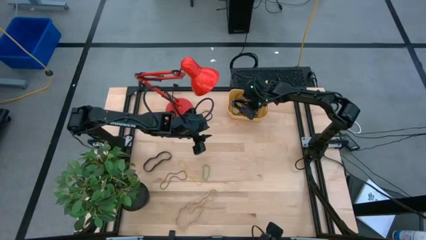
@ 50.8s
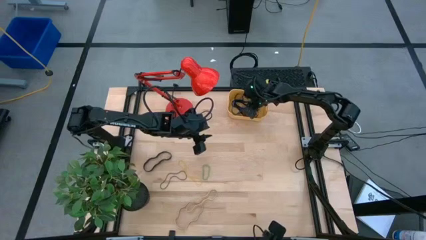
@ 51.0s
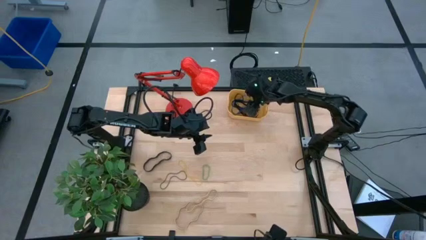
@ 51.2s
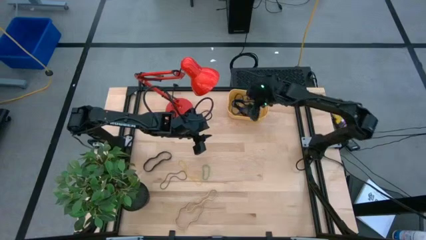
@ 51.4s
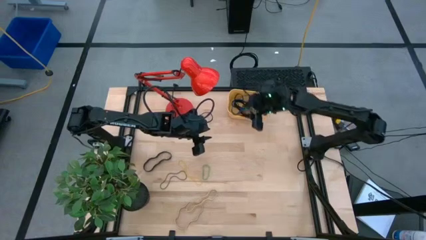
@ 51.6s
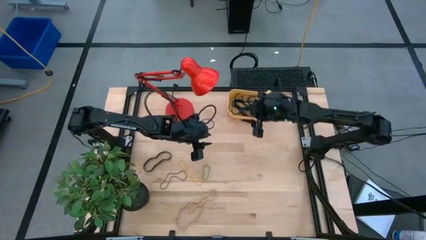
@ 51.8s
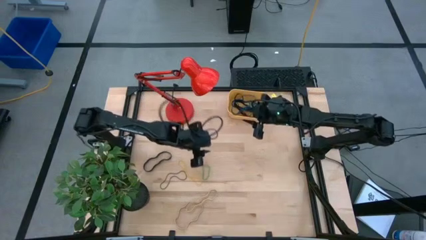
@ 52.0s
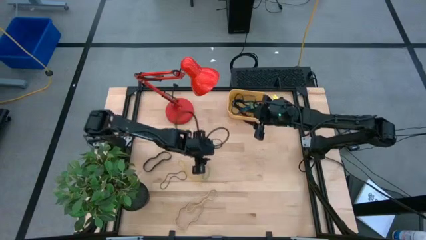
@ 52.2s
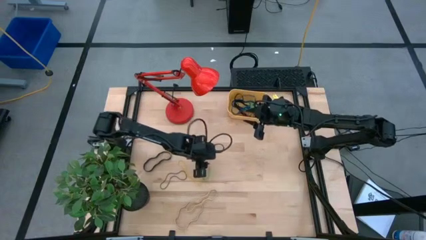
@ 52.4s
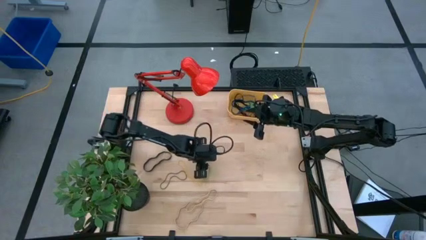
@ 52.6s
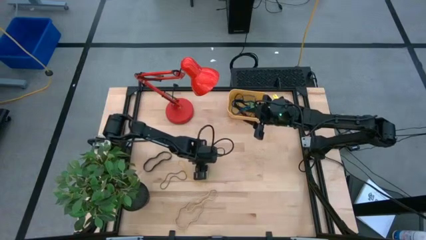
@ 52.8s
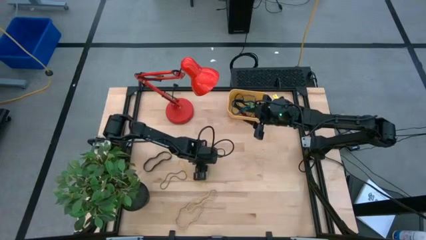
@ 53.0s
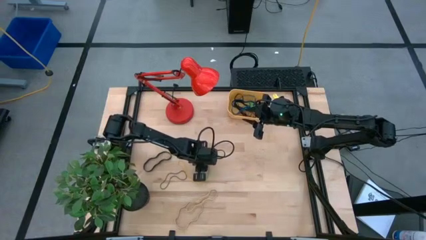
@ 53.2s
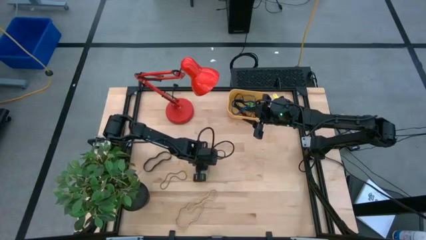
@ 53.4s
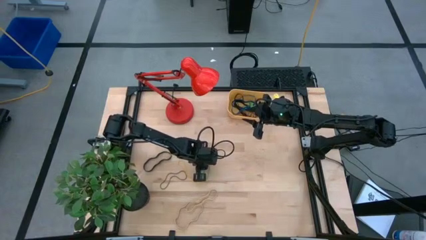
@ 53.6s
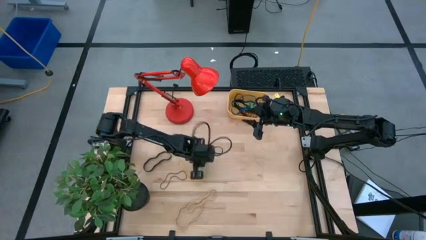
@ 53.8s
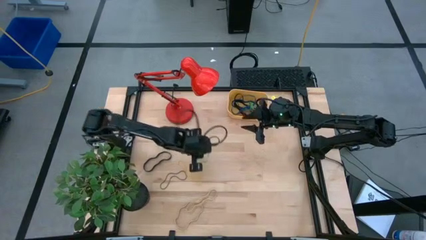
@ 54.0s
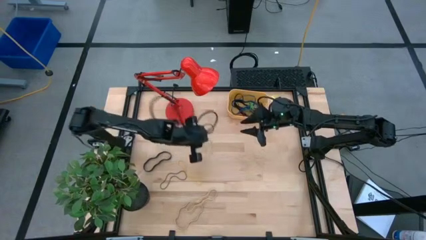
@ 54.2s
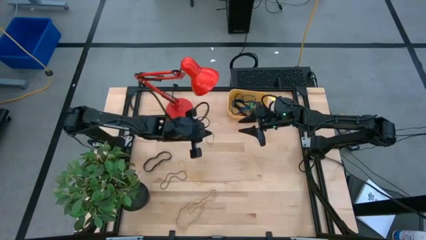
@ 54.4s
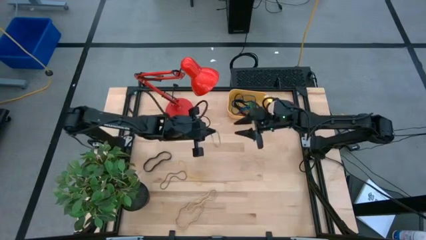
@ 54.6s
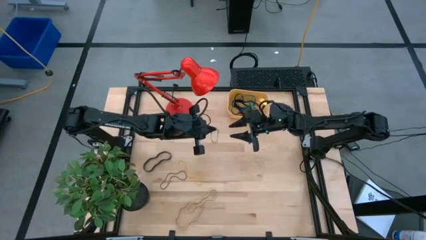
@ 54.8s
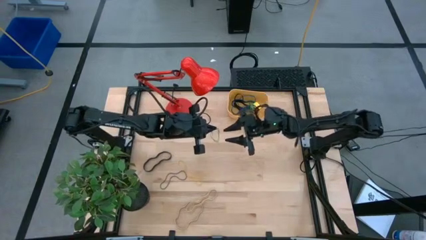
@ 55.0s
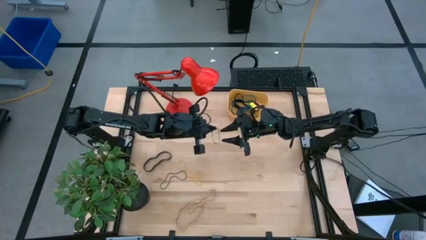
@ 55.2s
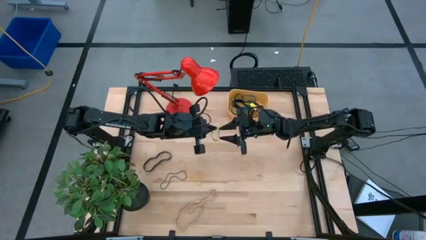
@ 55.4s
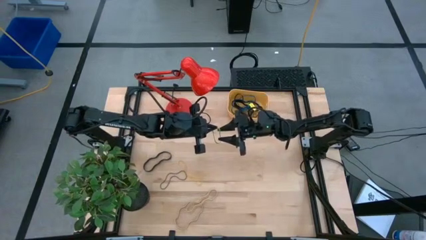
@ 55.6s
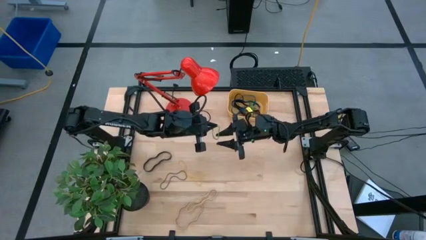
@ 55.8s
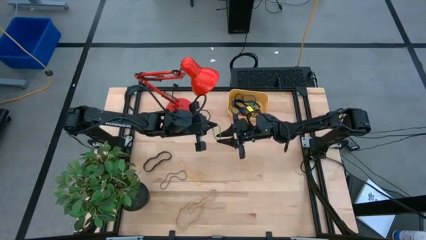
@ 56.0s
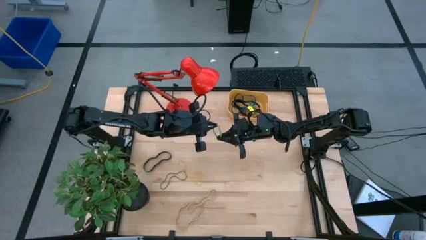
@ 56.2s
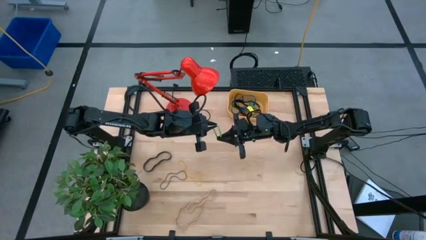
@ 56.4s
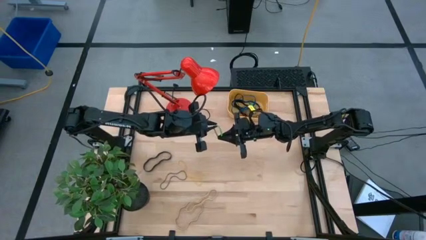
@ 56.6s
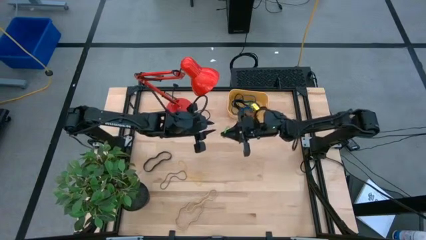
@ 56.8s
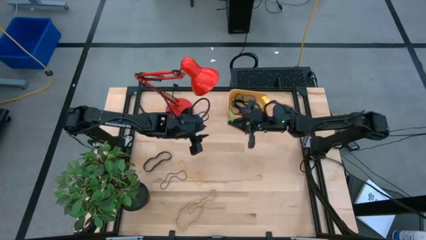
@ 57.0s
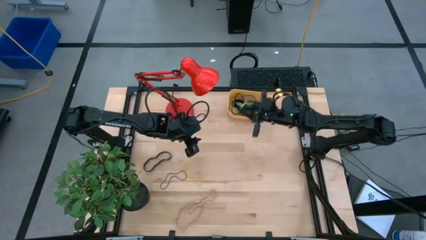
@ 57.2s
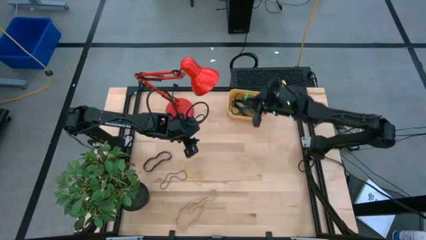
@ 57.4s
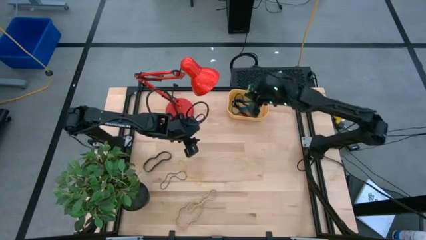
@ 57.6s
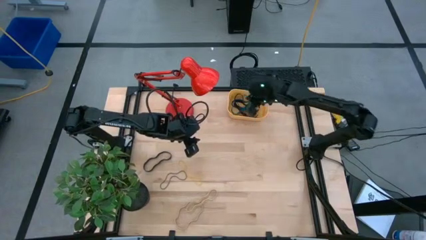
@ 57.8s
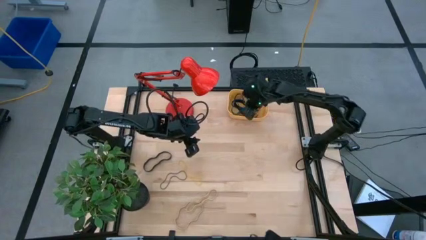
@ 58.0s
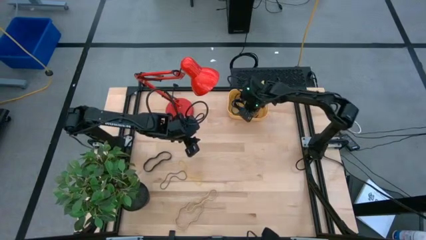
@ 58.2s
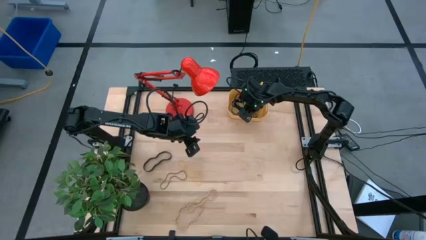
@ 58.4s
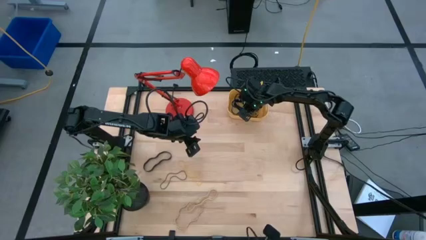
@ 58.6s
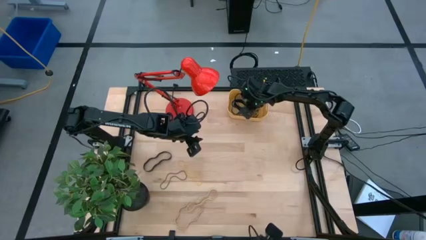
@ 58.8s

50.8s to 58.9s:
Task: Pick and place rubber bands into bin
Put the green rubber band into the yellow container

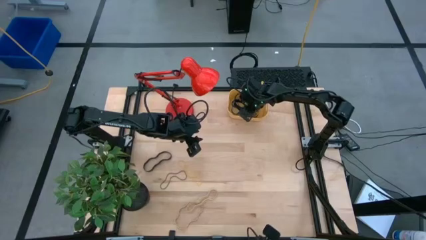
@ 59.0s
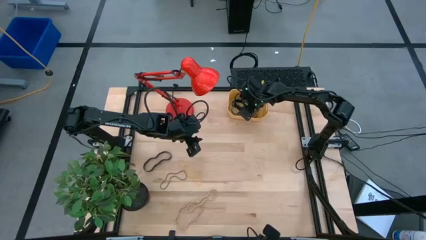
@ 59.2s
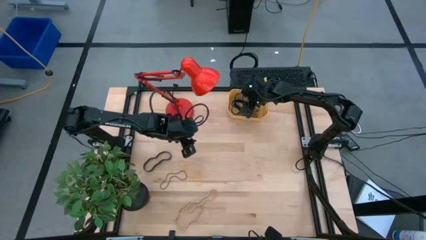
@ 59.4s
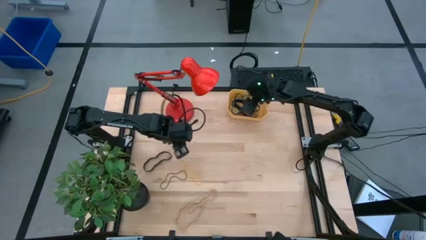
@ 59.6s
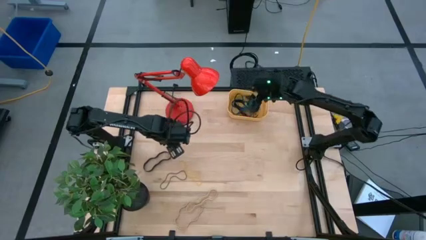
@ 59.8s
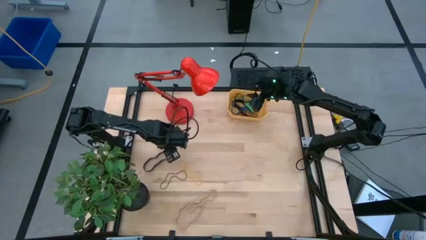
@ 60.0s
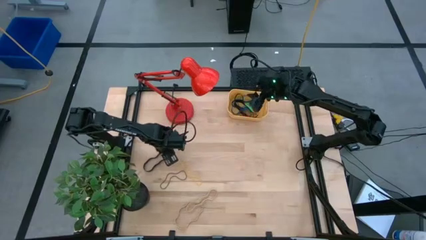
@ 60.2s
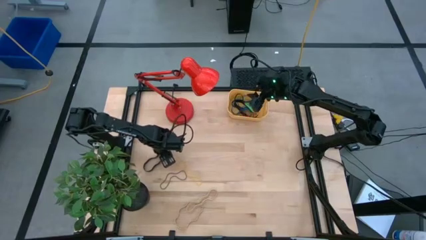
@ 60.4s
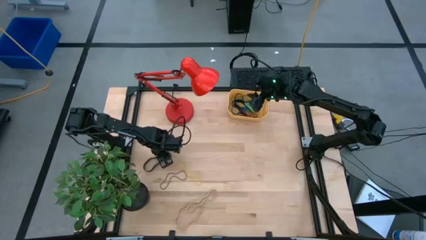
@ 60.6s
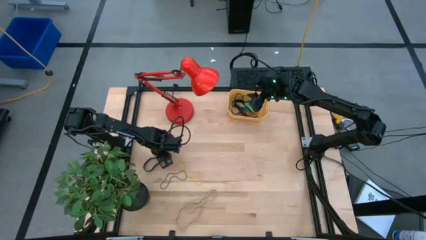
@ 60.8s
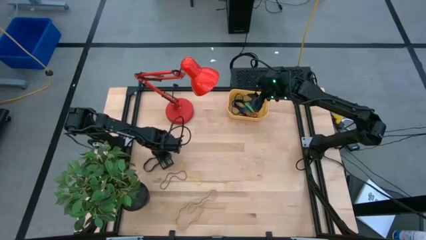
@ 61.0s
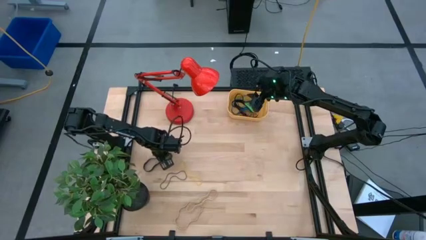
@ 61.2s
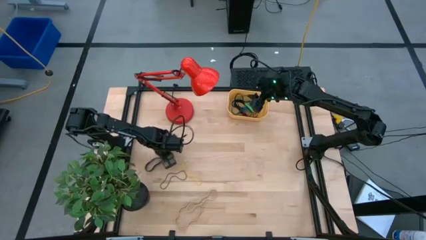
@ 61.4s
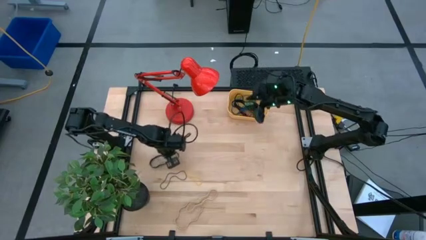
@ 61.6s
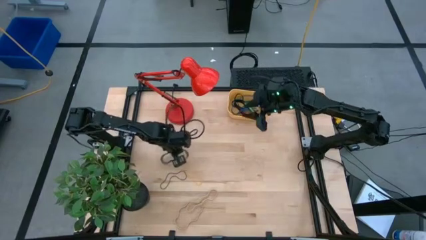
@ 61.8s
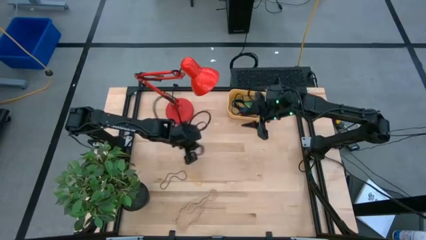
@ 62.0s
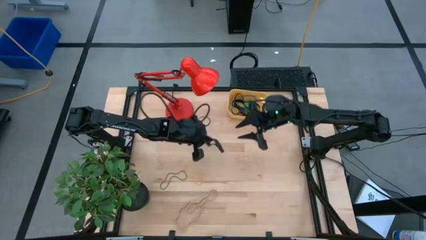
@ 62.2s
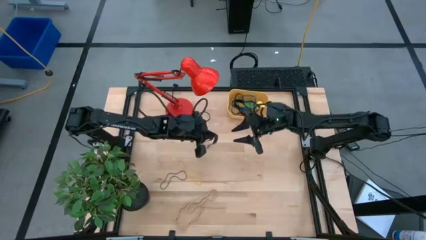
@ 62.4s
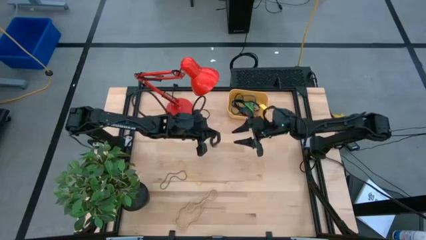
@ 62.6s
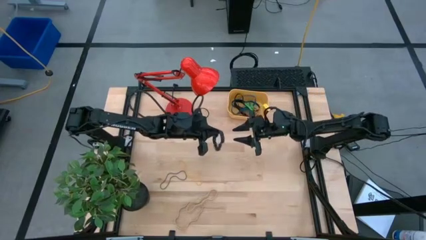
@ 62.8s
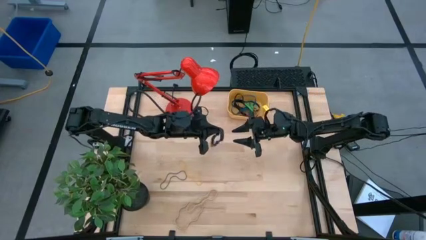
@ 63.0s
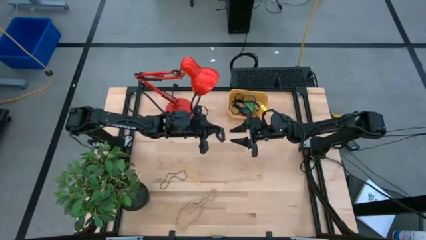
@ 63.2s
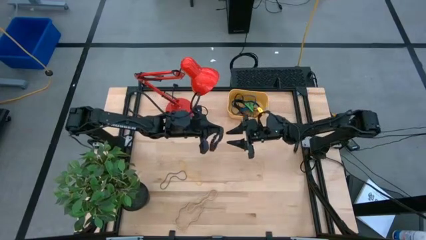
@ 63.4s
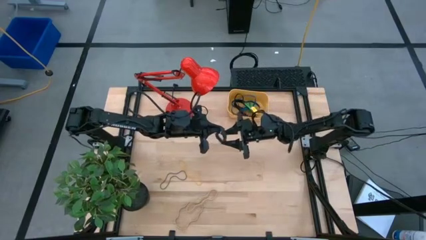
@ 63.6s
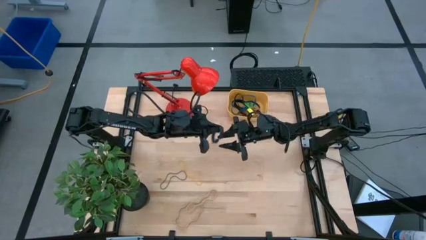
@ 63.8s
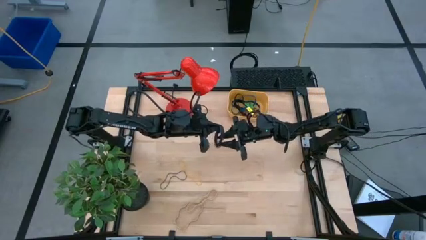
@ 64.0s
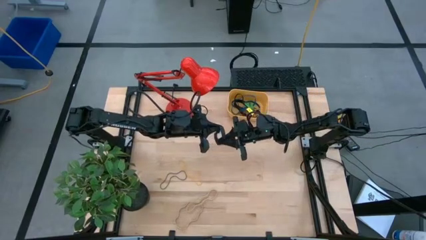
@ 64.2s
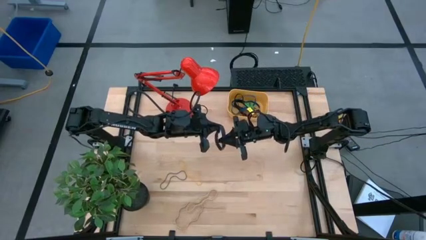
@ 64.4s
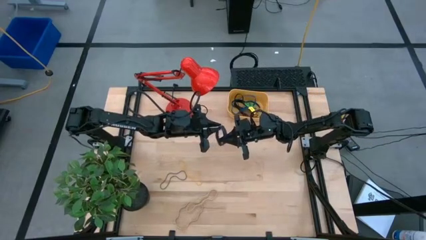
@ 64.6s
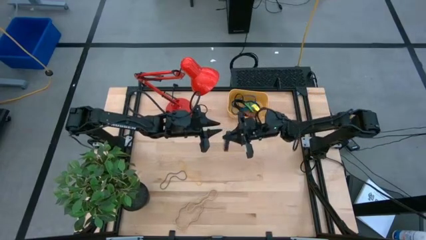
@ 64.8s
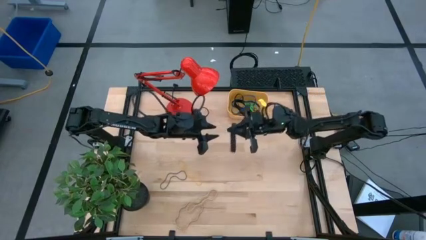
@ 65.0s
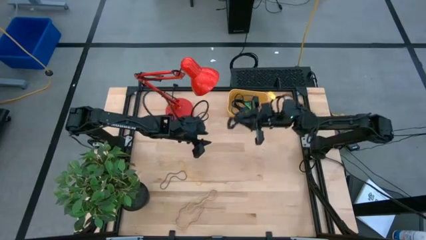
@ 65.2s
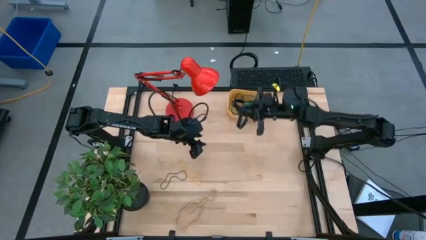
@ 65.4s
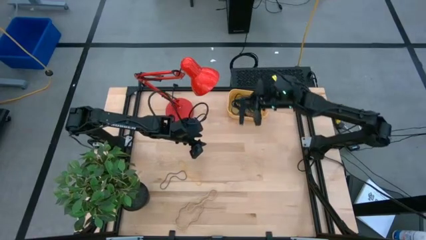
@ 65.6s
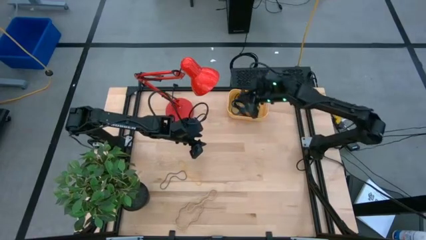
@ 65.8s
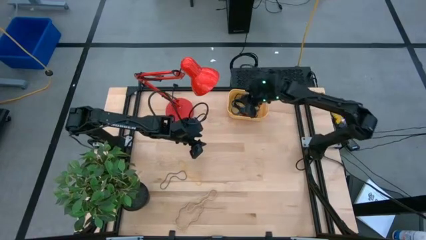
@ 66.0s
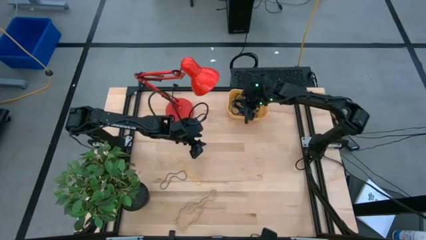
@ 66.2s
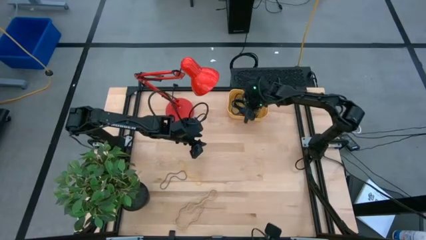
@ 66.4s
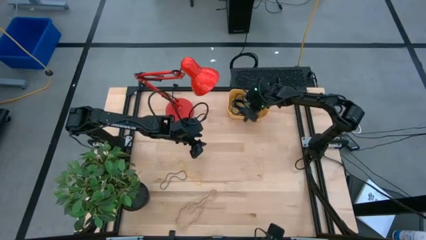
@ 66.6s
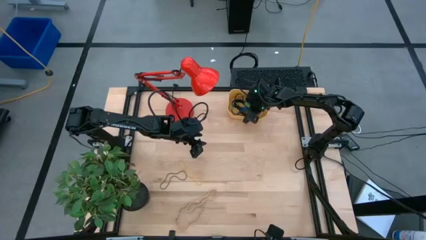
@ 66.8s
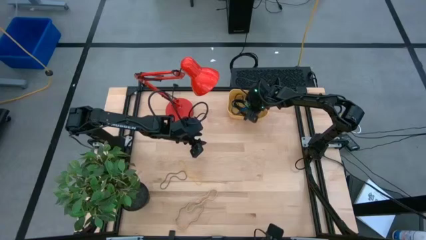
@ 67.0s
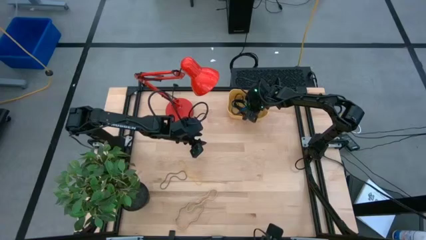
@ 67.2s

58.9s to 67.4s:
Put the black rubber band into the yellow container
